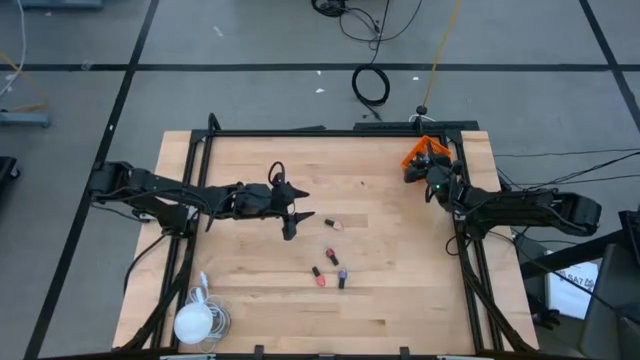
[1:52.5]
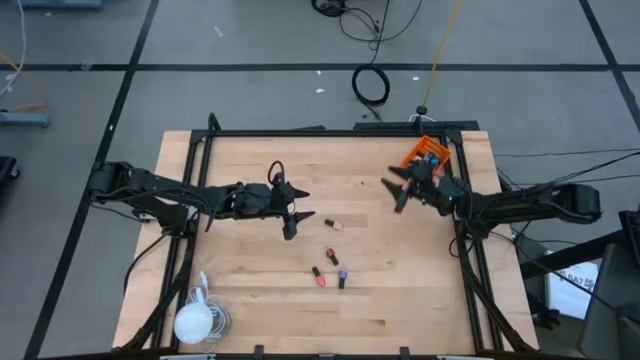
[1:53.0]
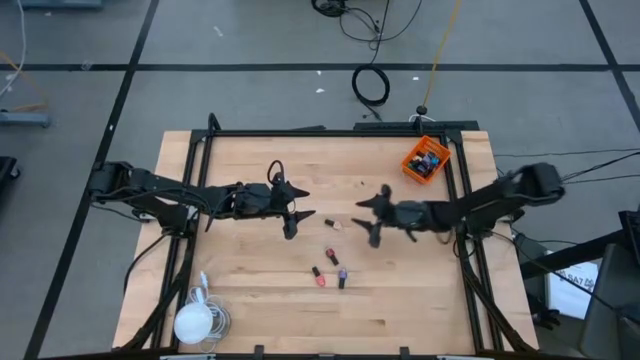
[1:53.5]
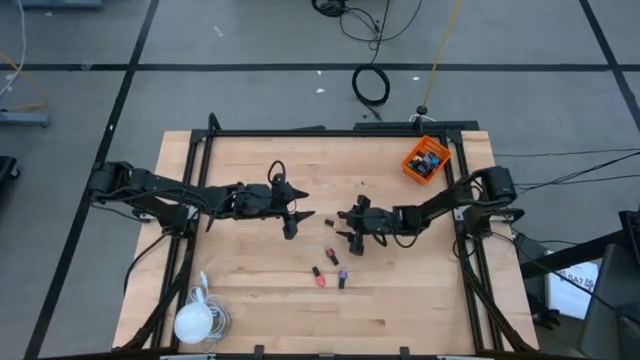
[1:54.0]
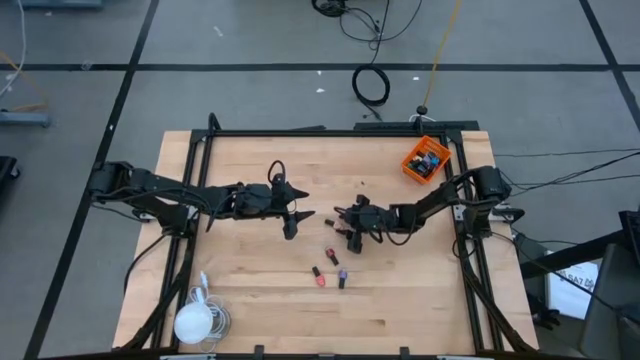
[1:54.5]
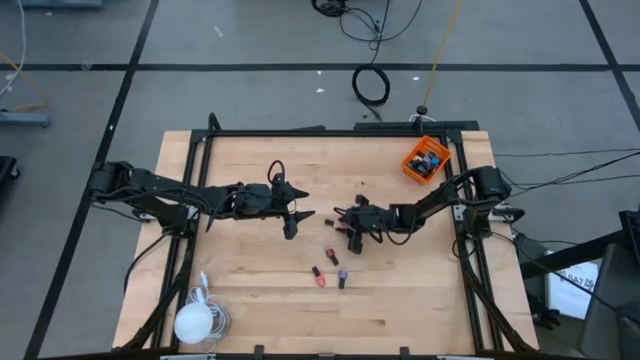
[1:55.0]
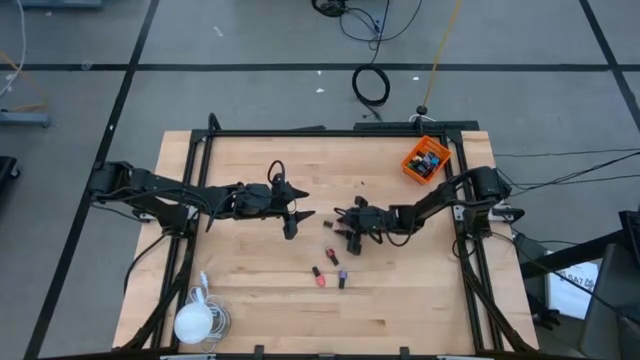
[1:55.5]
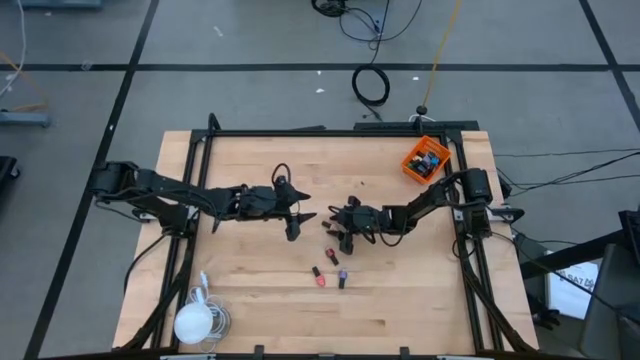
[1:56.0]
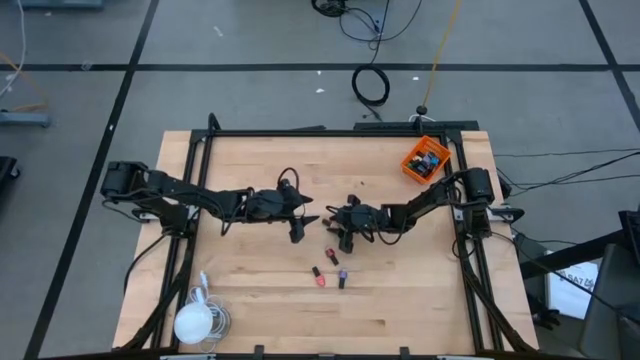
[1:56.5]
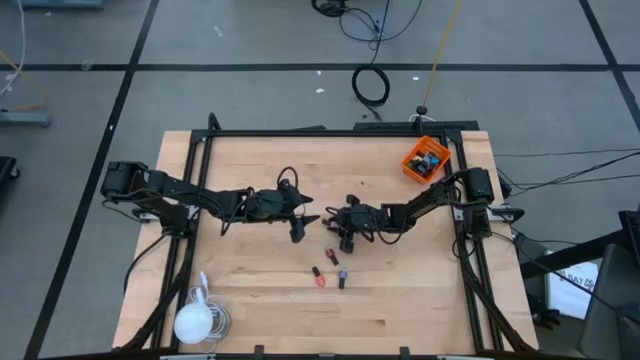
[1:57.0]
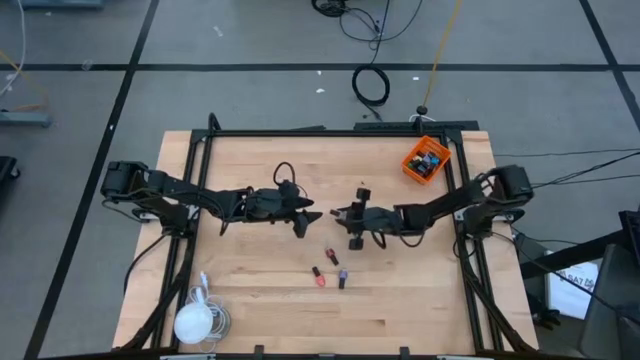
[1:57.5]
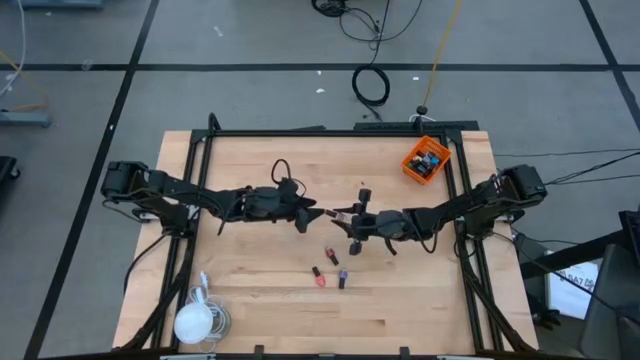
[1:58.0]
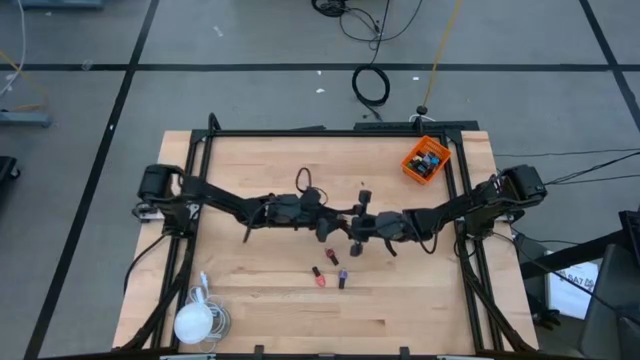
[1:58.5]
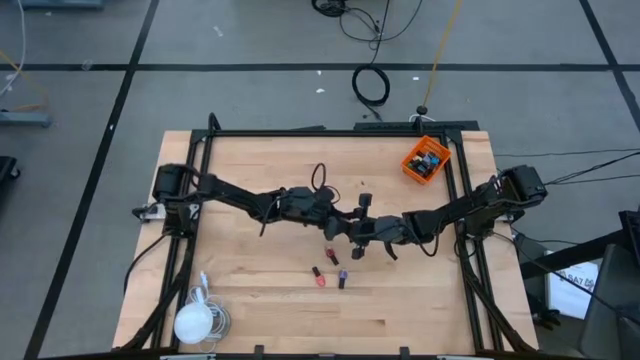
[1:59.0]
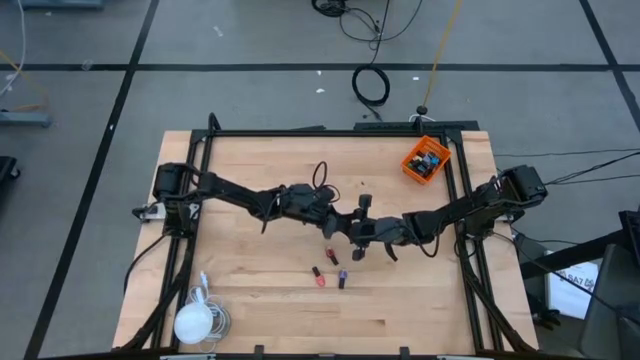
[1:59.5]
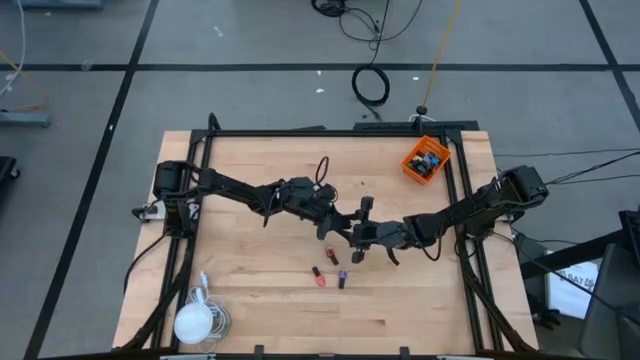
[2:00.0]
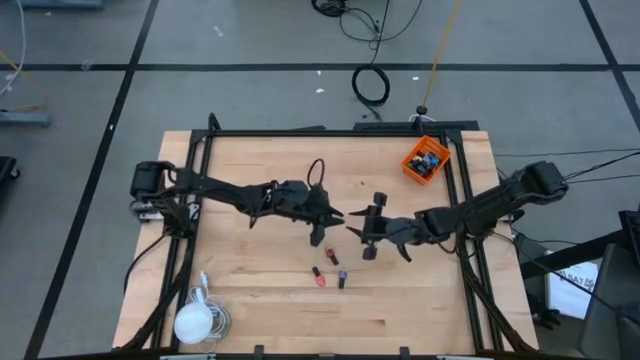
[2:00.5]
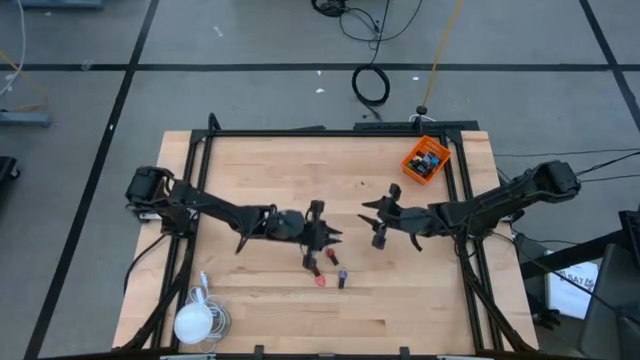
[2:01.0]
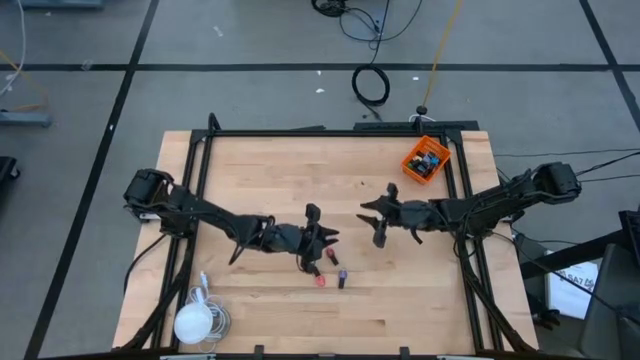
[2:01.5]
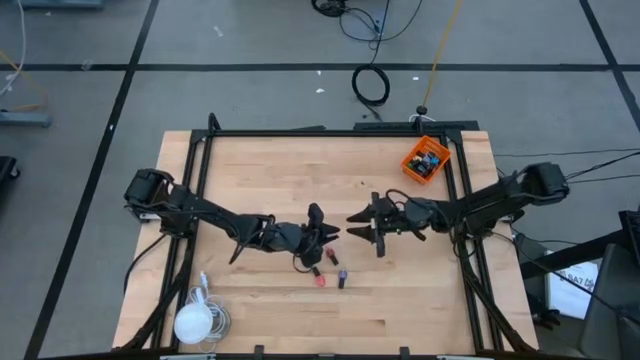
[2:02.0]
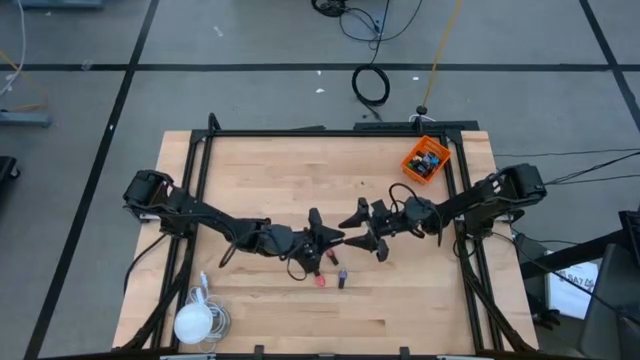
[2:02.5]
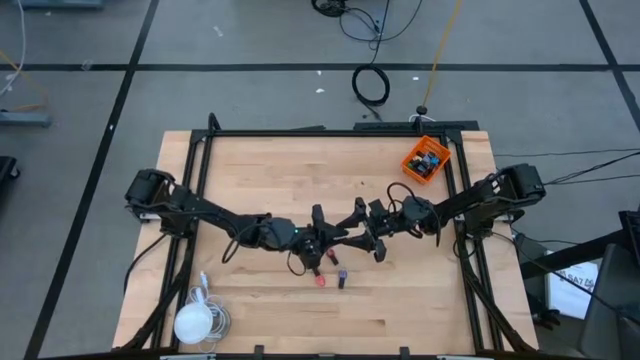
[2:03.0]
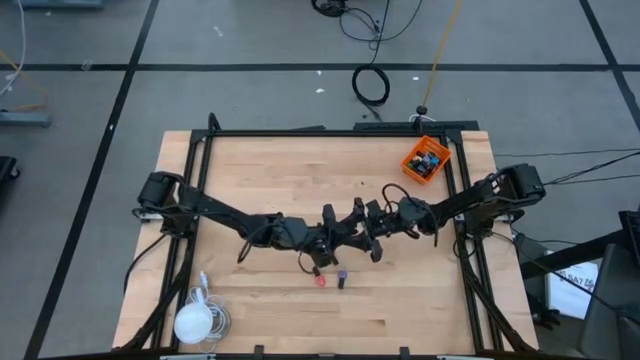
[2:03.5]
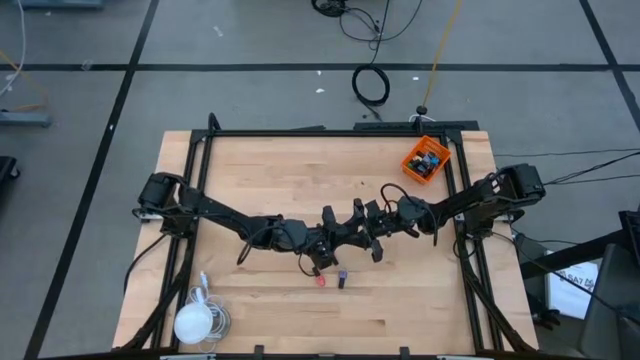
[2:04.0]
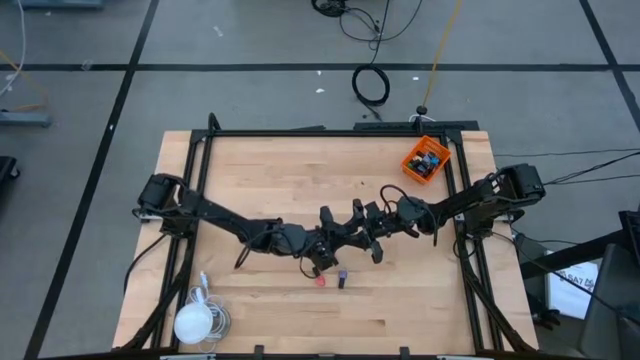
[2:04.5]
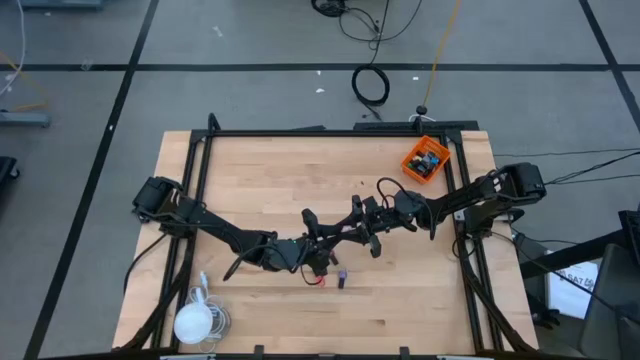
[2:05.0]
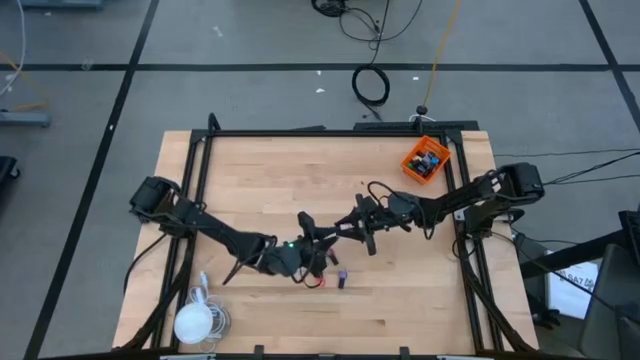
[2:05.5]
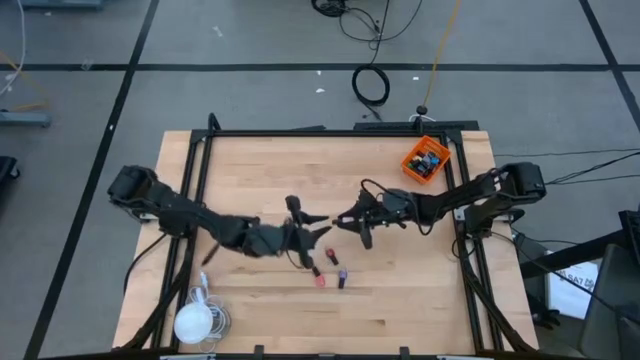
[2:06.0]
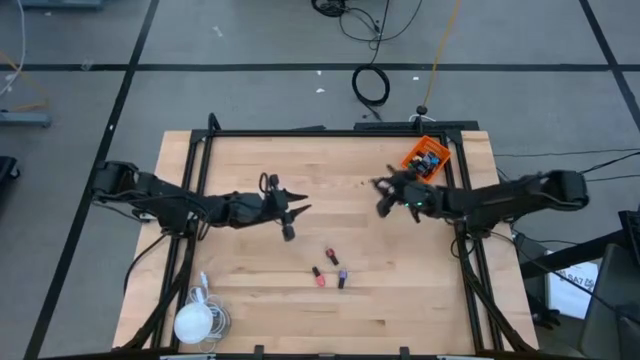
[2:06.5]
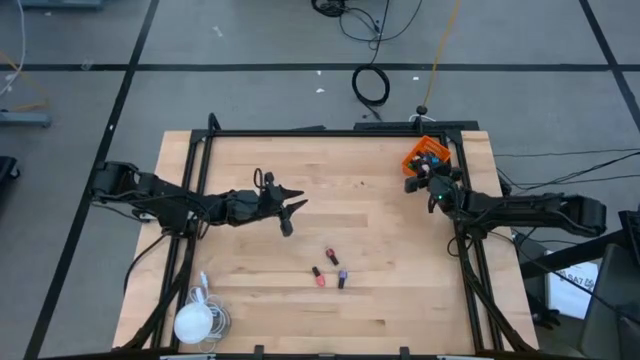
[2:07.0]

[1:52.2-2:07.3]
Task: Pick & Place Nail Polish
Put the brown nail polish bottle into the orange basket

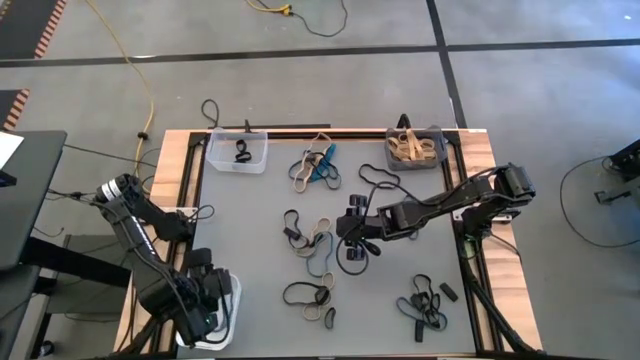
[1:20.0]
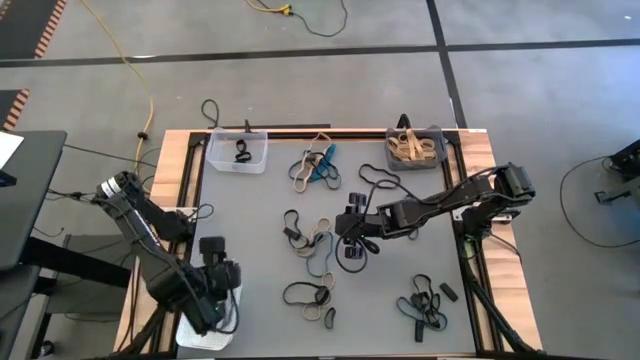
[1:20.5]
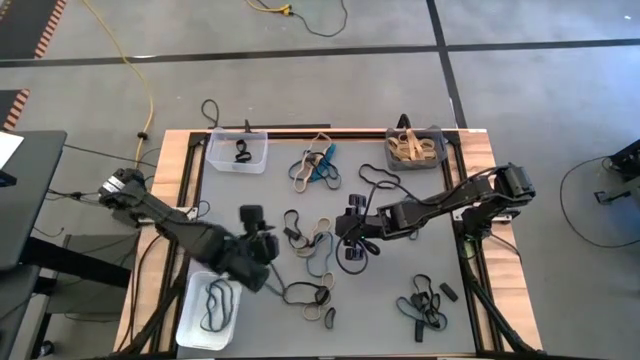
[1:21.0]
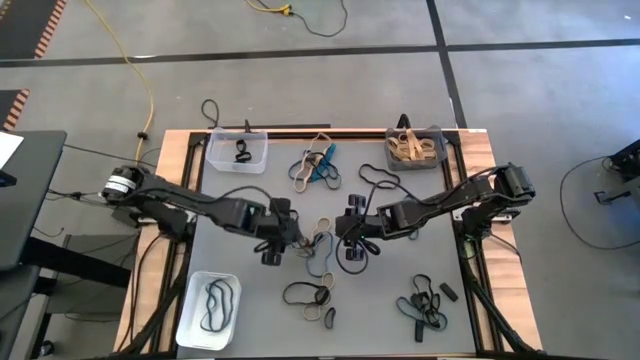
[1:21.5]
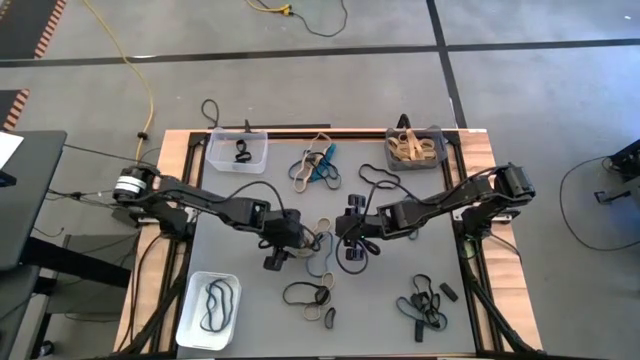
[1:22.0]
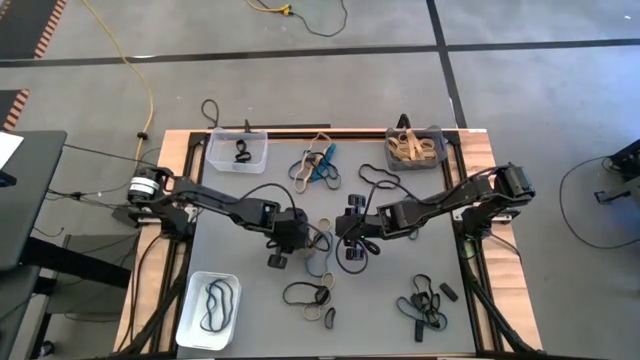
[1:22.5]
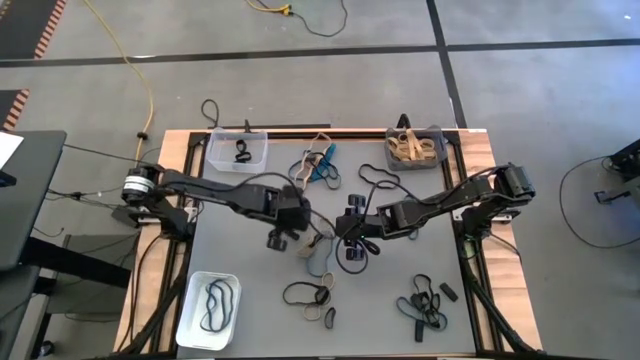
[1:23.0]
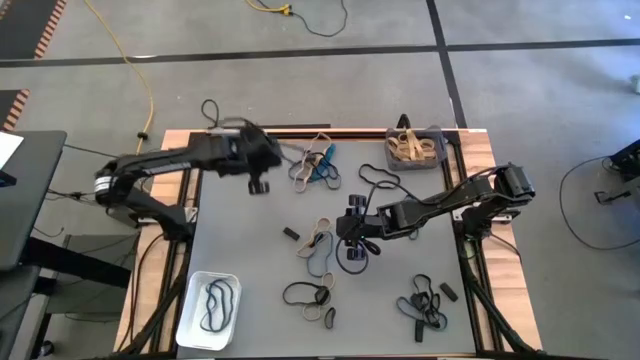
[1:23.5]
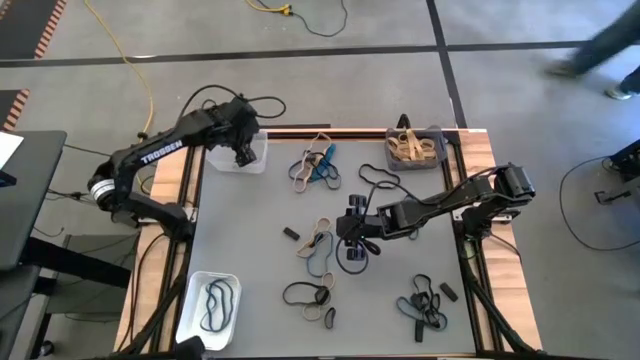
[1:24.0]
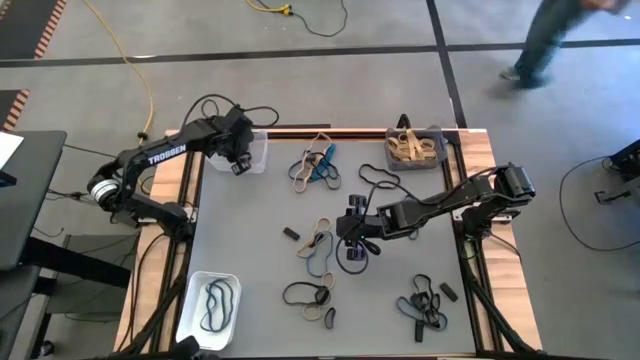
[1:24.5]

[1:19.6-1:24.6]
Task: Sort rubber bands into baskets
Put the black rubber band into the transparent bin

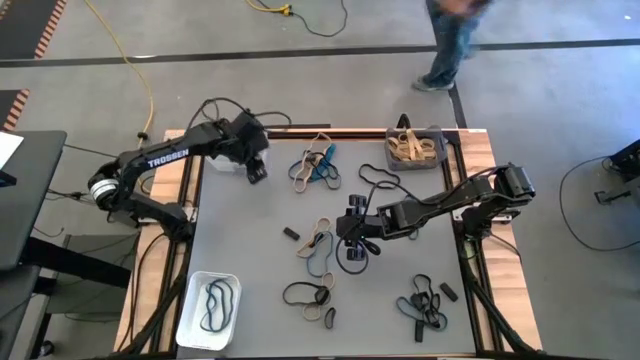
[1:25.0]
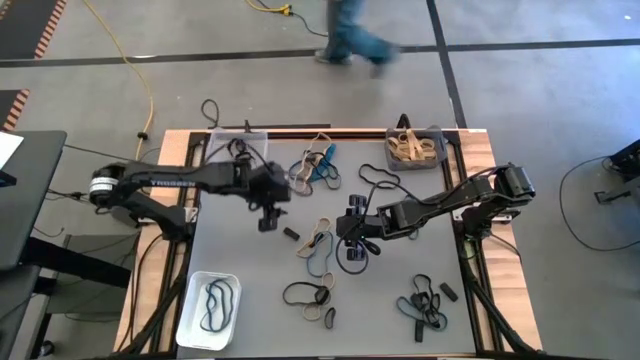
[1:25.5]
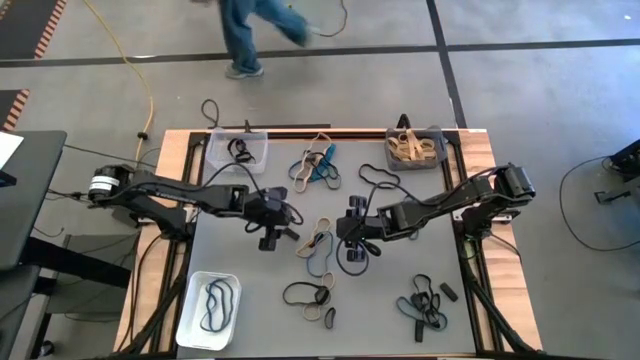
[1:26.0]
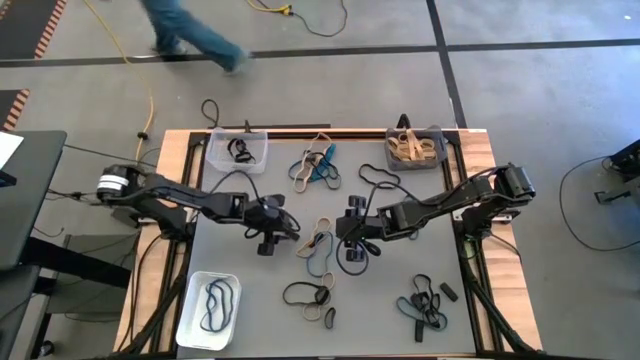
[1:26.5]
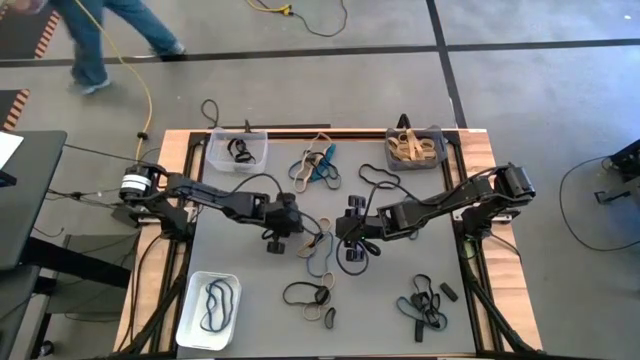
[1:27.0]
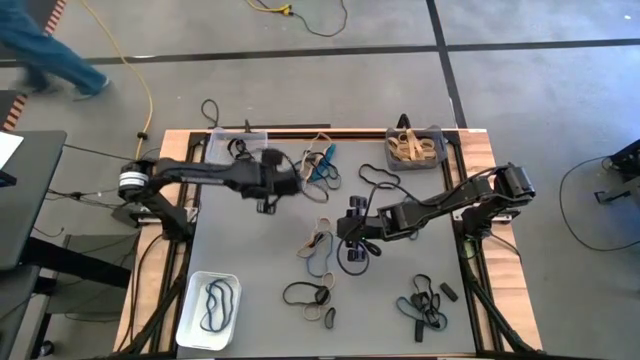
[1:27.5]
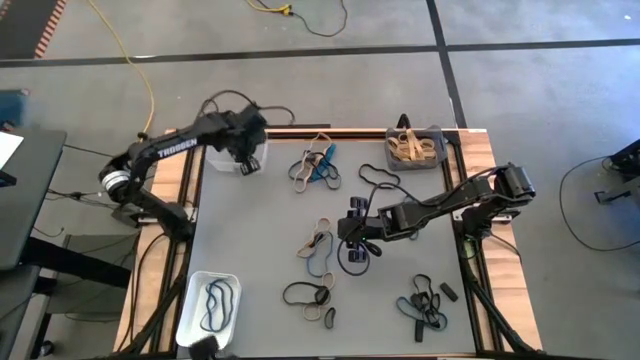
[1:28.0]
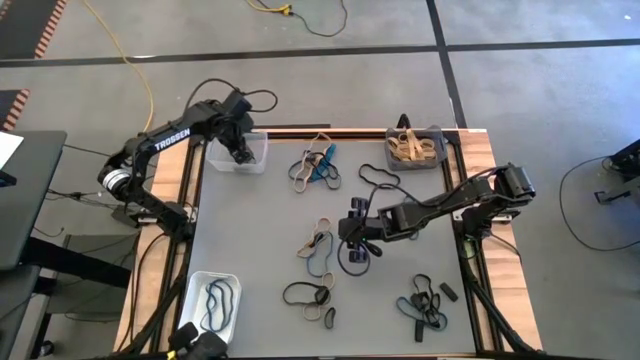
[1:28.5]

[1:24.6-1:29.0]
Put the black rubber band into the transparent bin
